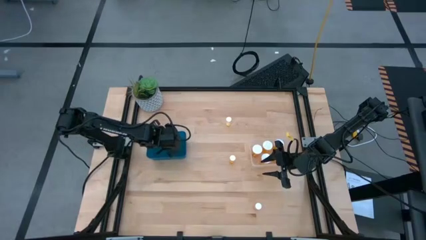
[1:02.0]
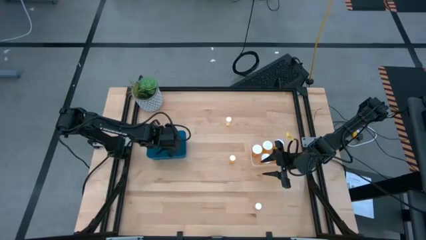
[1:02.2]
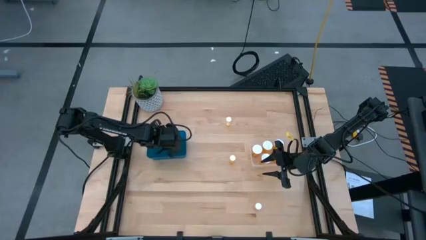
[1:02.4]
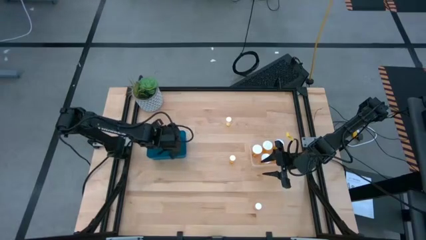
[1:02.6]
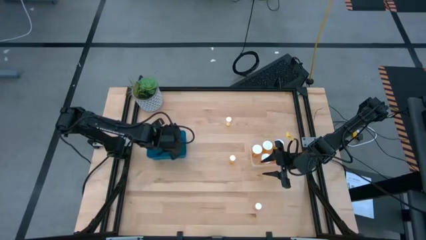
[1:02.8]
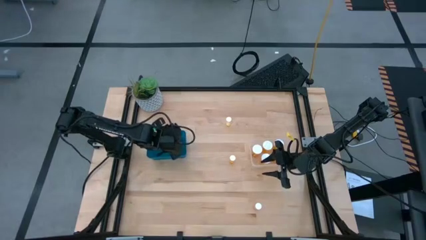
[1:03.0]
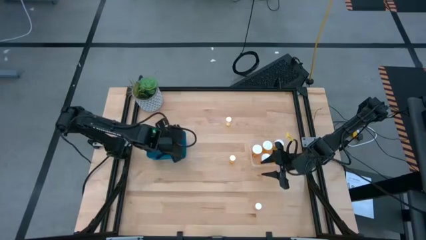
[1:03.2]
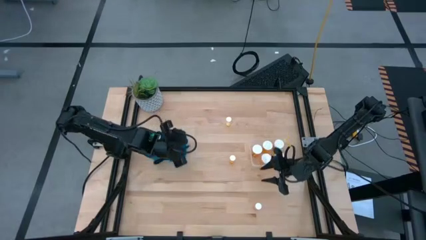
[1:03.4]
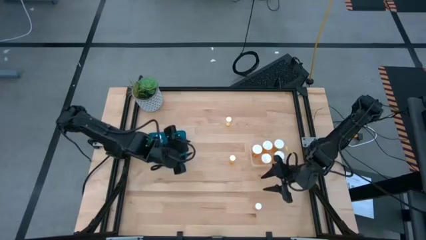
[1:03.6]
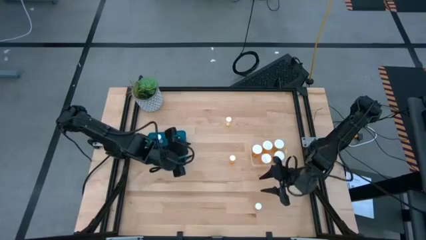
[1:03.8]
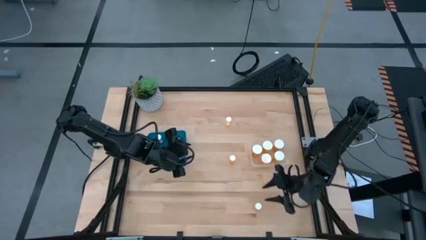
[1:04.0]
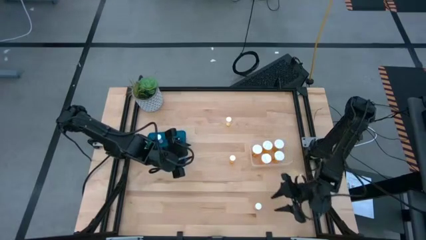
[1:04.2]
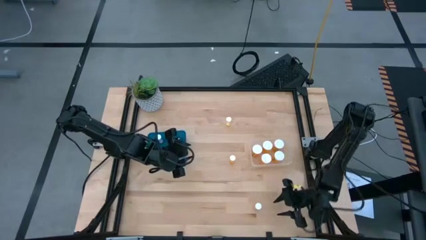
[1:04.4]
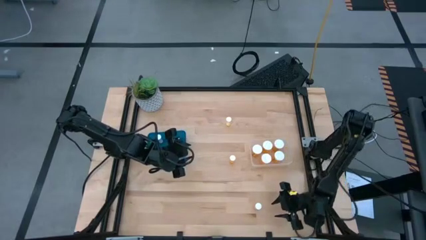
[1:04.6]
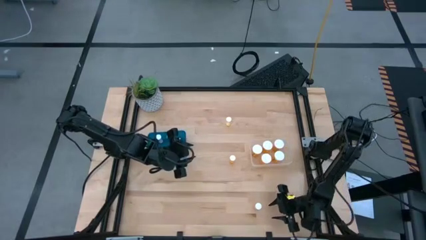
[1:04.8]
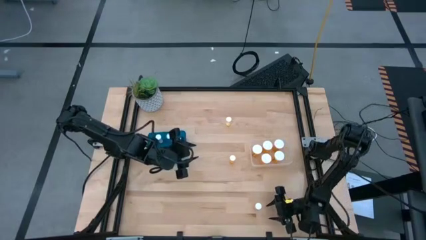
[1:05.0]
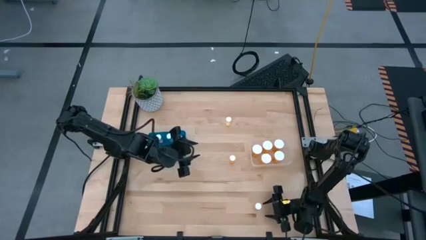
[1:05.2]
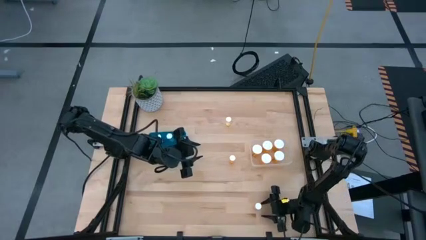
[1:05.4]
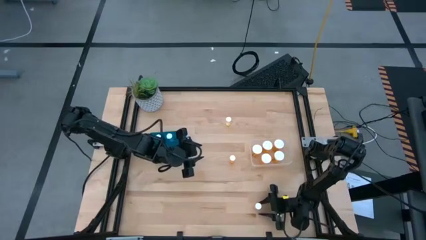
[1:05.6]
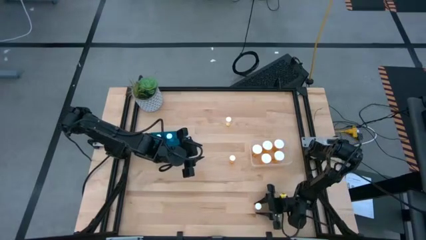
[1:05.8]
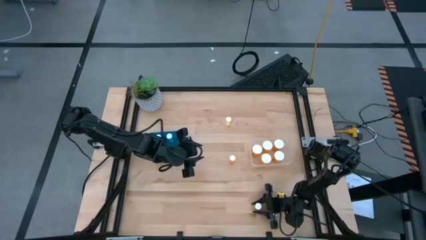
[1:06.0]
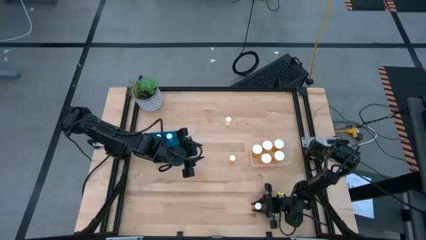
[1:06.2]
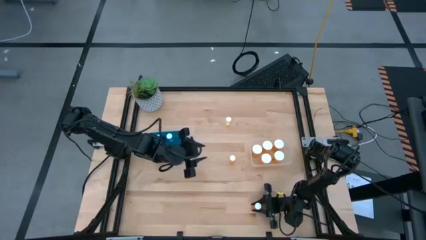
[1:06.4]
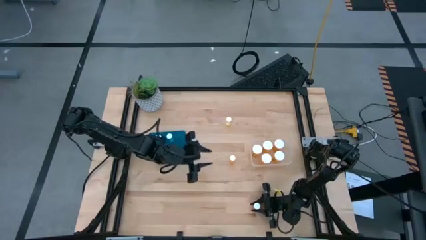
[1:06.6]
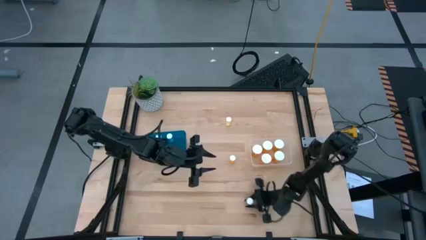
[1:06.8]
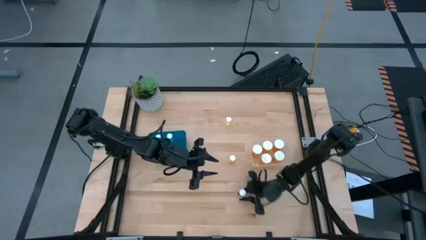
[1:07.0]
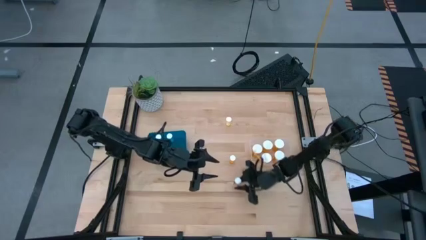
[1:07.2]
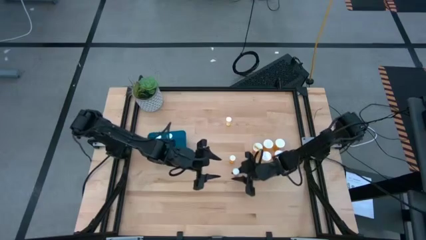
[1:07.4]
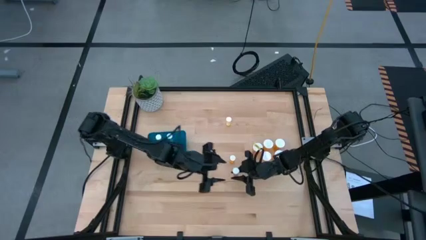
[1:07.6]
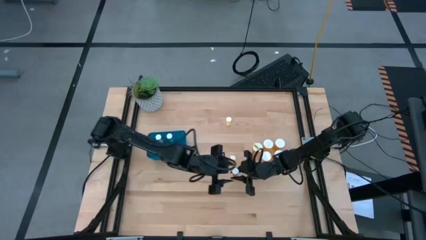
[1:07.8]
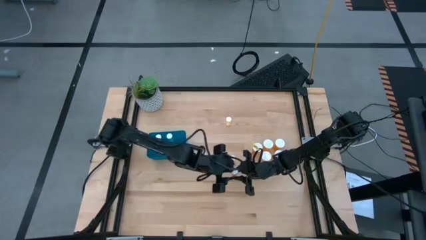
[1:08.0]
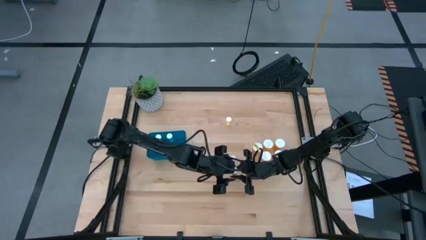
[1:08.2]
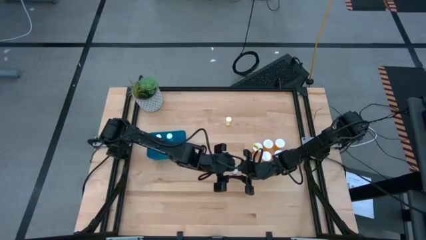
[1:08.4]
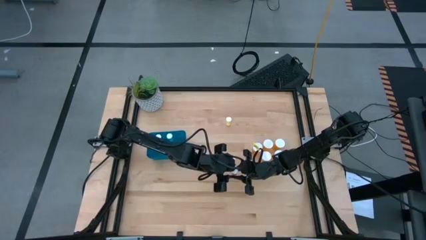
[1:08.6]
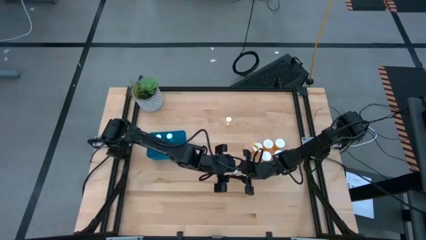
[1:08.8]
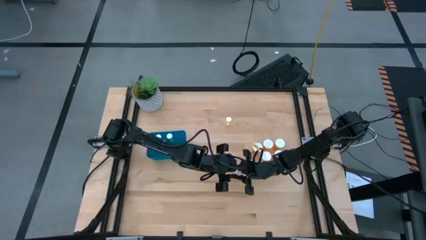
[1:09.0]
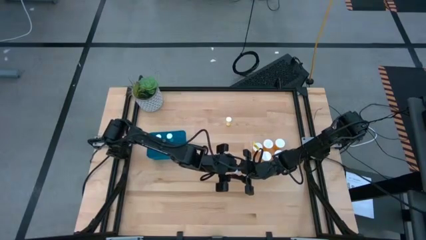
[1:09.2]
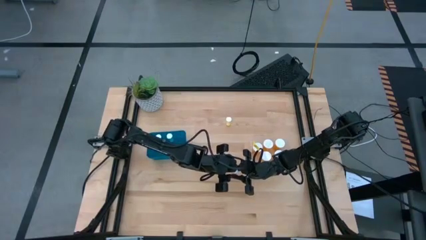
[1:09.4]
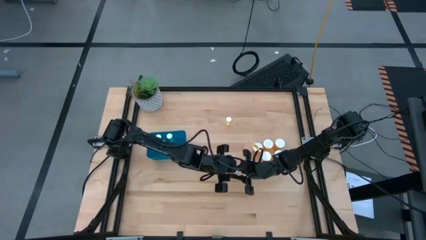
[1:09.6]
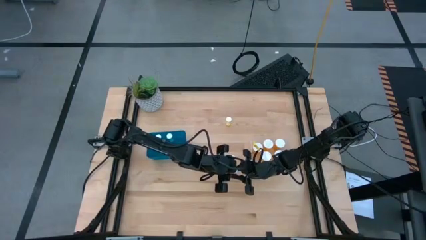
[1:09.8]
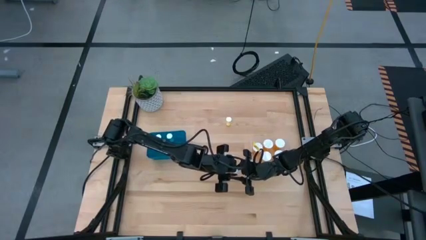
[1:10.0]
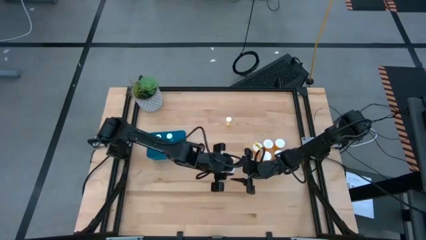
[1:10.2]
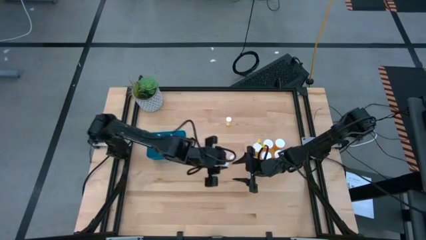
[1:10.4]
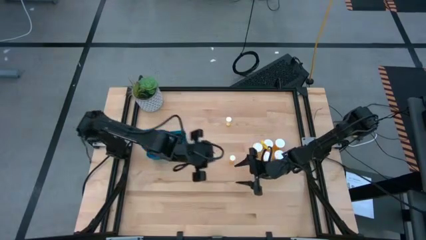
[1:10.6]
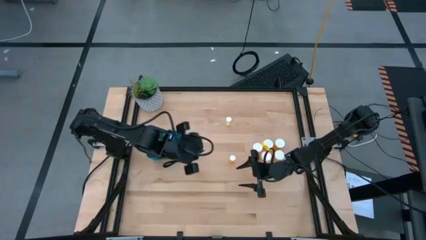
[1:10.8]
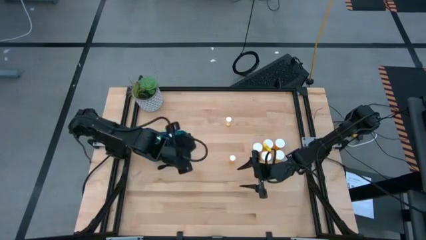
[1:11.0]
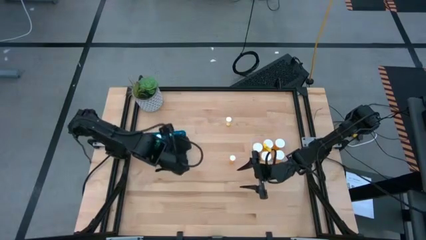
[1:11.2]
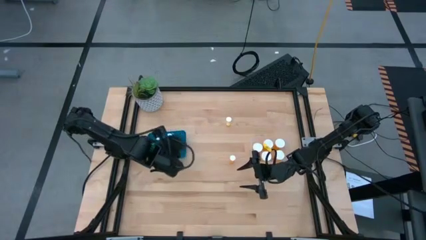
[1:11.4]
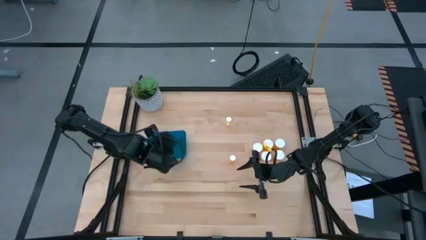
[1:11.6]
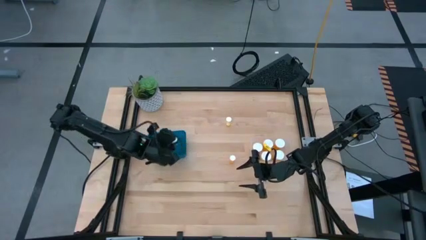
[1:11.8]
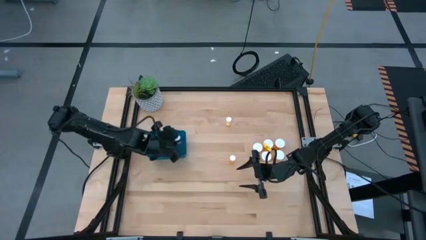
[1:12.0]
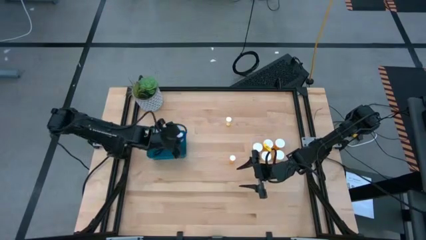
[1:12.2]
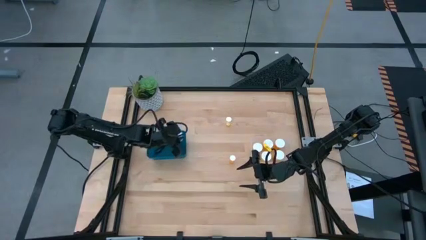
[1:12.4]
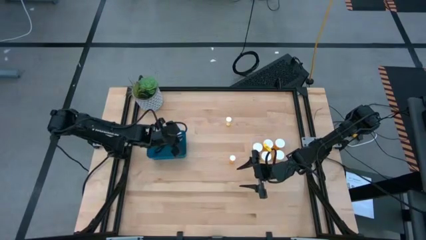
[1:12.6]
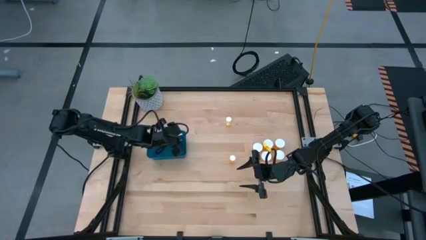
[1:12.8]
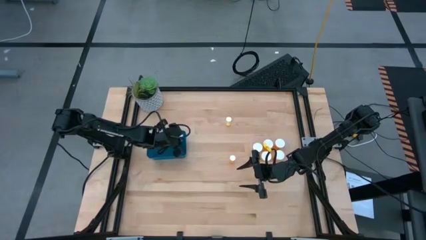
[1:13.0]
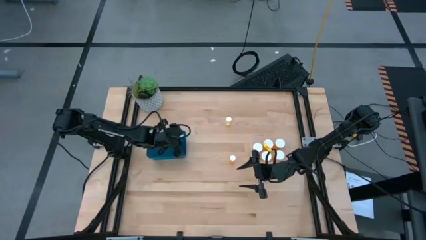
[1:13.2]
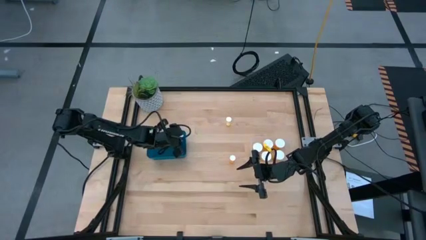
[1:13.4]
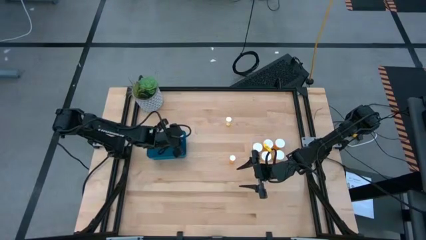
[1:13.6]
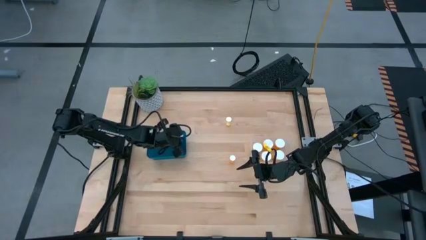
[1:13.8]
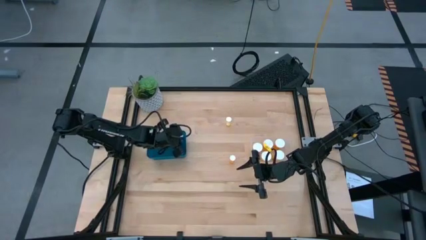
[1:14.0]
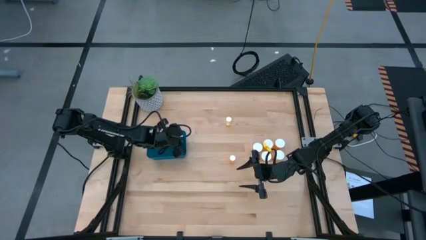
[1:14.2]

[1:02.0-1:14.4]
Task: Pick and place medicine bottles into bin by pill shape (circle, oval)
Put the small red pill bottle into the blue bin

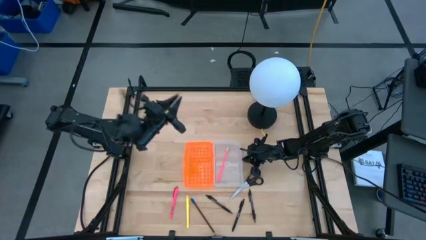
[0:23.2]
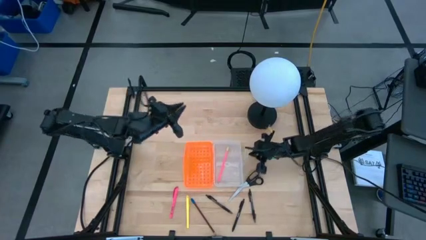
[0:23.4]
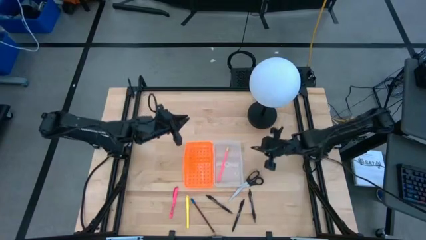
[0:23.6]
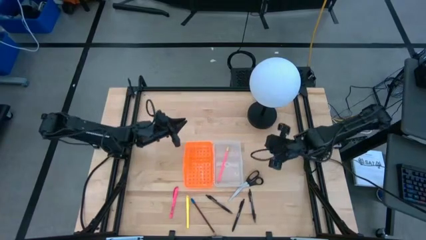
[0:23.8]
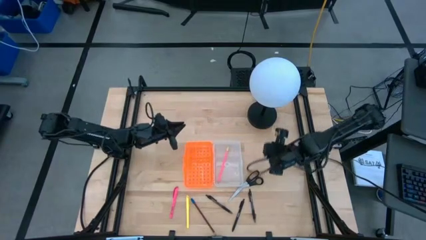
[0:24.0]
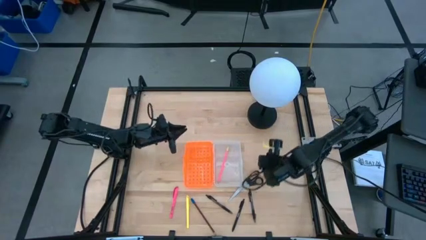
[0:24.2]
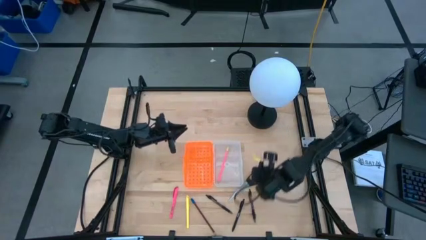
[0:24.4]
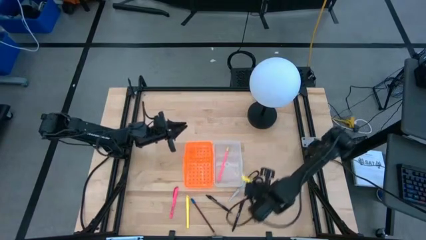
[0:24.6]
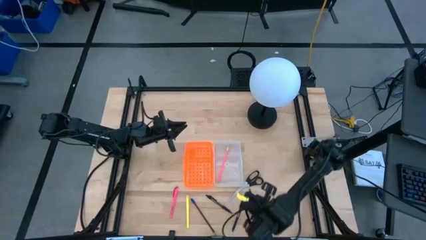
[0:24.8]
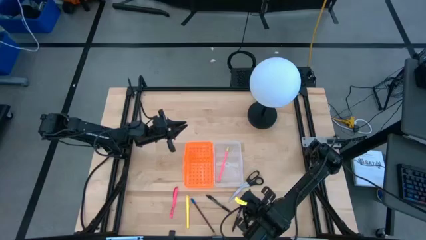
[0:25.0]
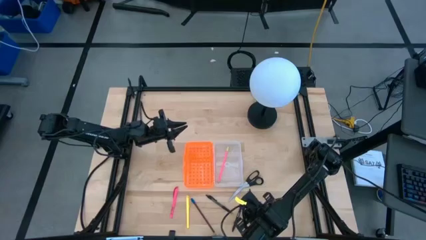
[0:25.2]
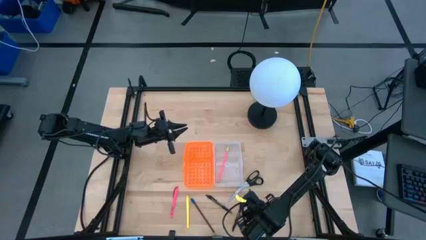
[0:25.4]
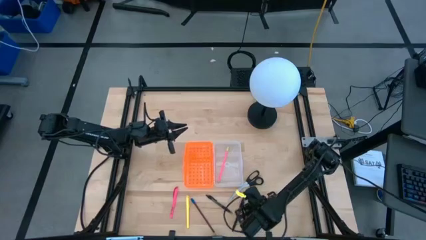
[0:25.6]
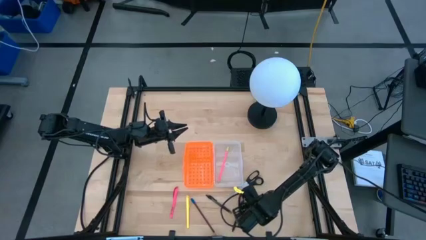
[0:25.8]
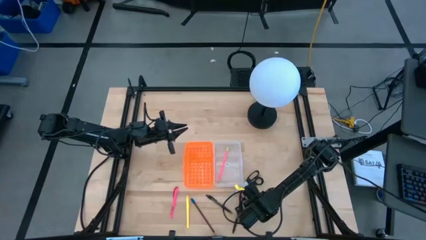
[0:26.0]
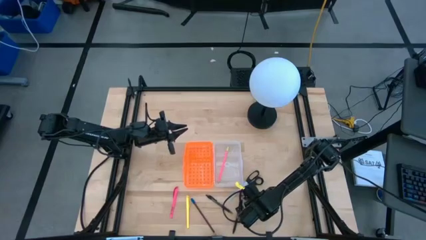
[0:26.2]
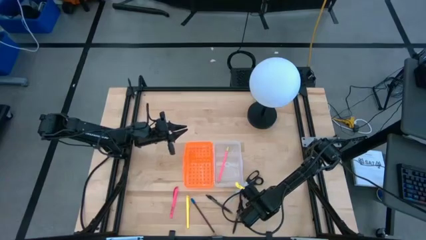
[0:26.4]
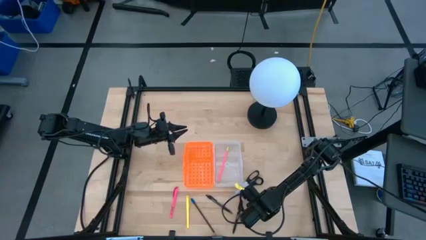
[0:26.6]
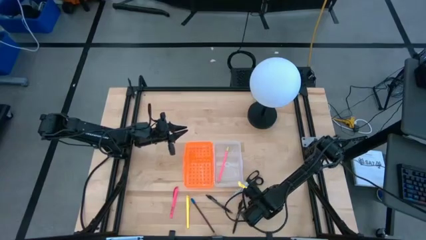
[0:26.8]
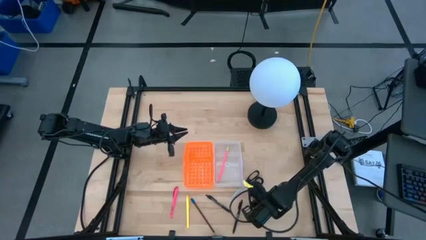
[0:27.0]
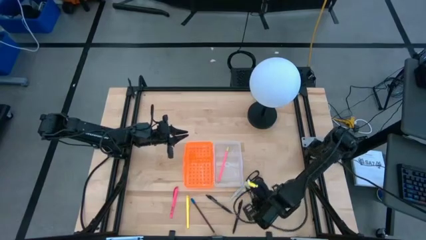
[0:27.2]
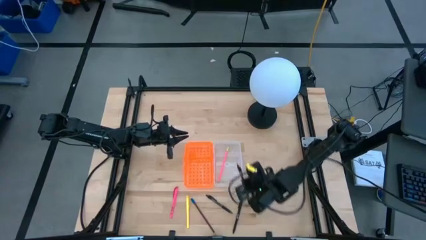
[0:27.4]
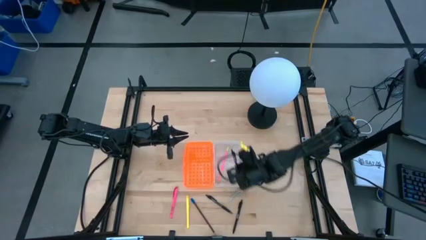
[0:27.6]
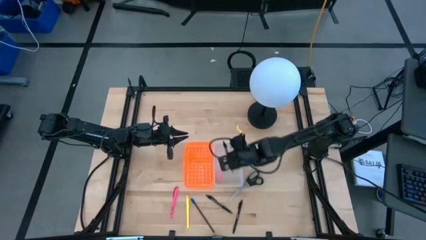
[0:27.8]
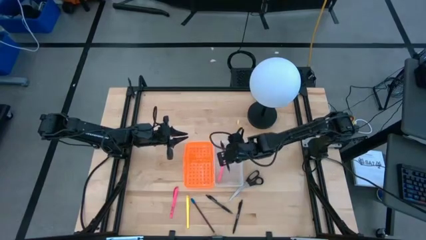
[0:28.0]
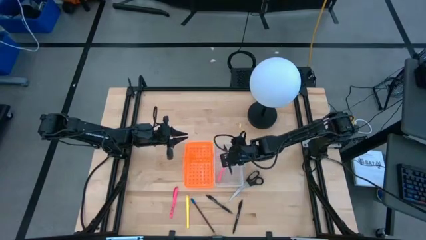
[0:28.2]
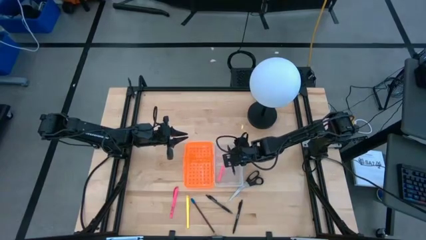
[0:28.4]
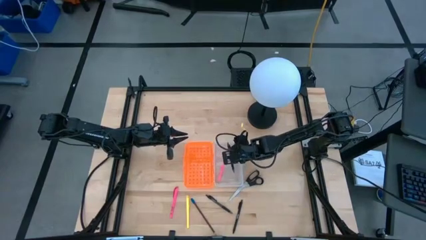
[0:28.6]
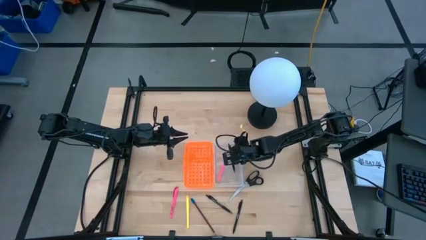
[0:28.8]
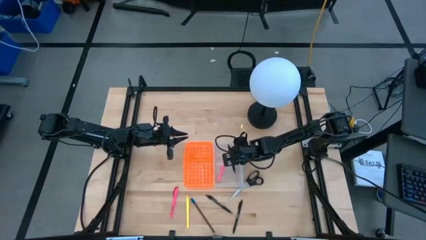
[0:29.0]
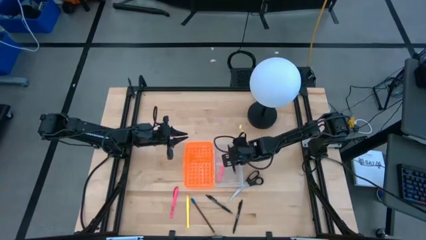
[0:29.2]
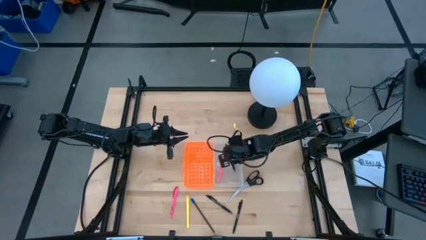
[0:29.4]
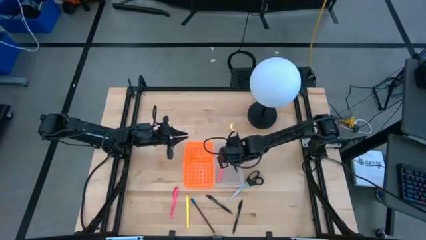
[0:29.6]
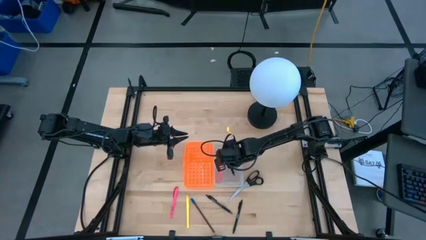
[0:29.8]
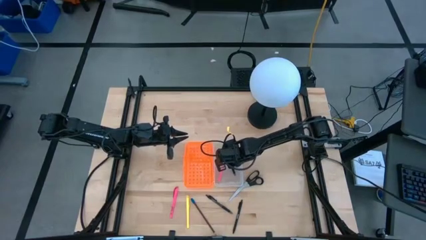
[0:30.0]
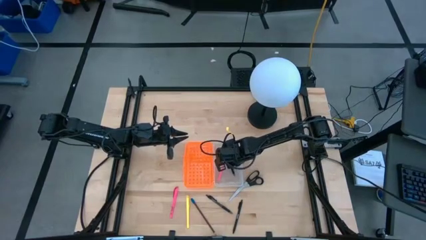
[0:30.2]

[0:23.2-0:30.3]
Task: Pick & place school supplies into a supply box
Put the right black pen into the orange supply box
